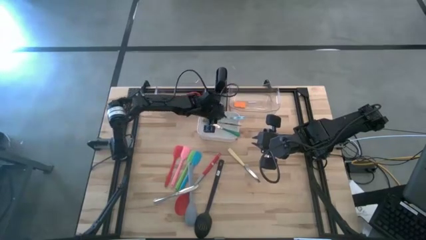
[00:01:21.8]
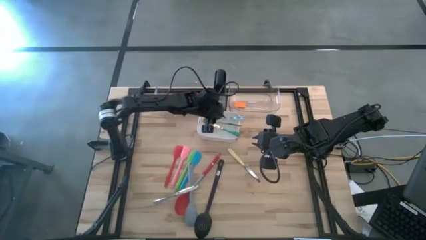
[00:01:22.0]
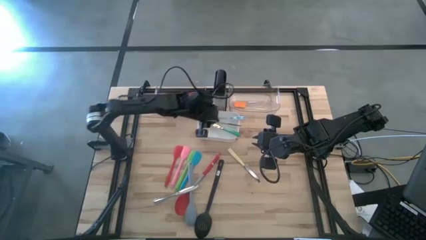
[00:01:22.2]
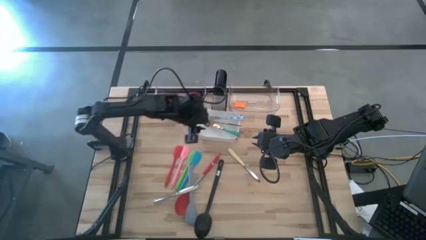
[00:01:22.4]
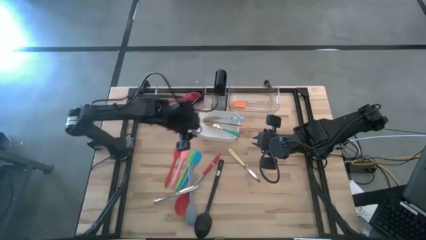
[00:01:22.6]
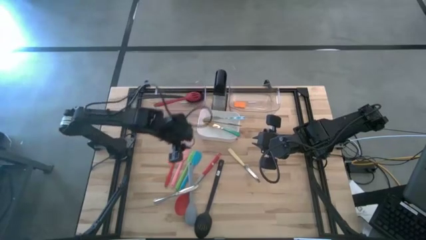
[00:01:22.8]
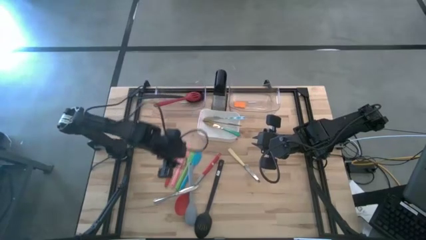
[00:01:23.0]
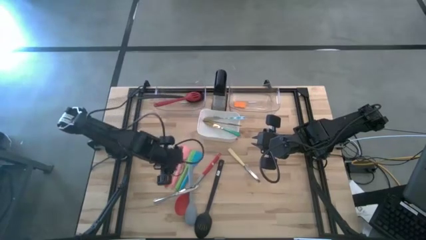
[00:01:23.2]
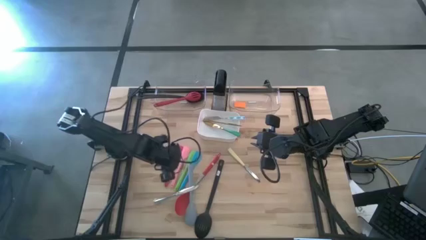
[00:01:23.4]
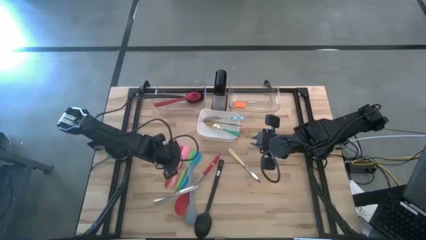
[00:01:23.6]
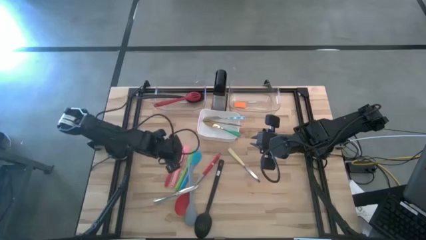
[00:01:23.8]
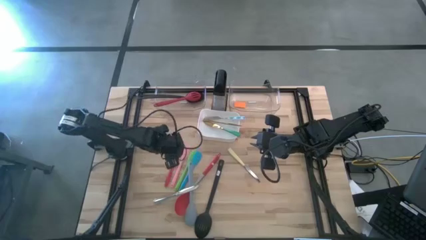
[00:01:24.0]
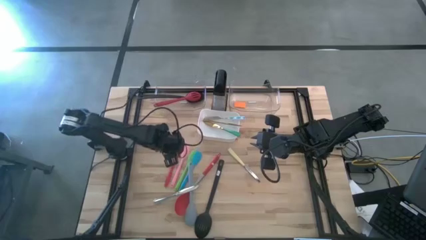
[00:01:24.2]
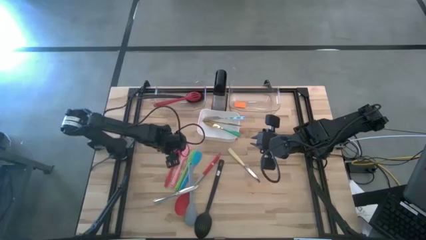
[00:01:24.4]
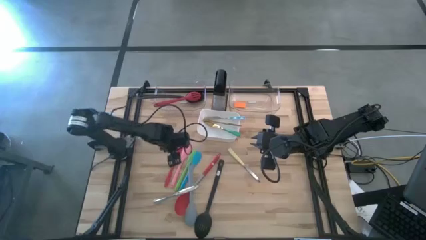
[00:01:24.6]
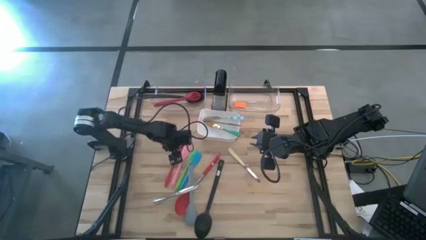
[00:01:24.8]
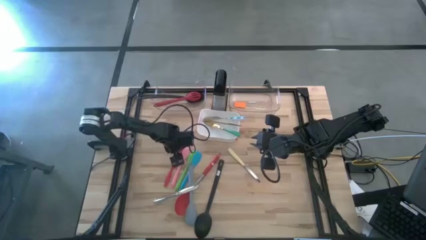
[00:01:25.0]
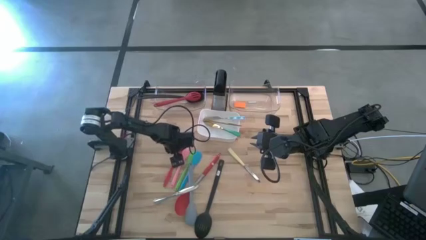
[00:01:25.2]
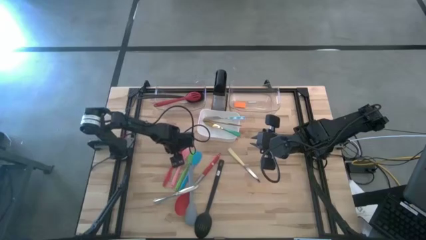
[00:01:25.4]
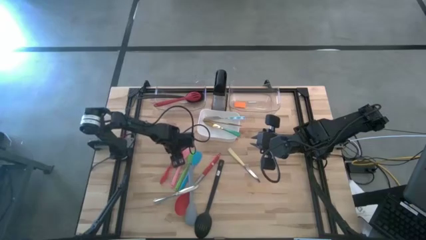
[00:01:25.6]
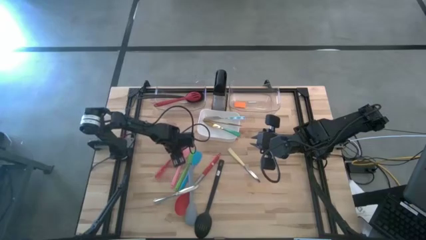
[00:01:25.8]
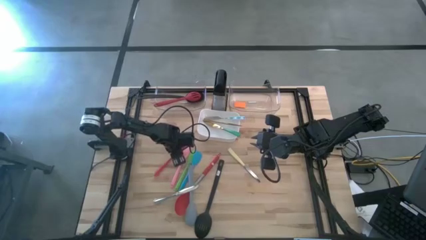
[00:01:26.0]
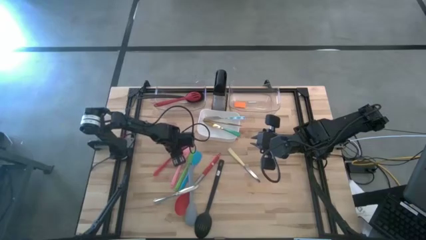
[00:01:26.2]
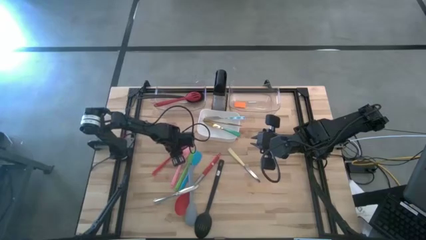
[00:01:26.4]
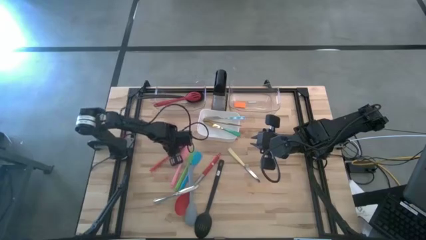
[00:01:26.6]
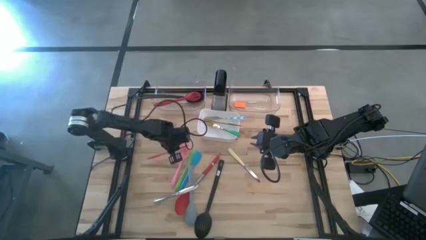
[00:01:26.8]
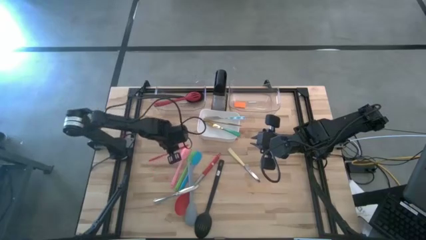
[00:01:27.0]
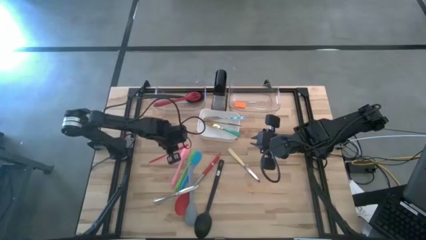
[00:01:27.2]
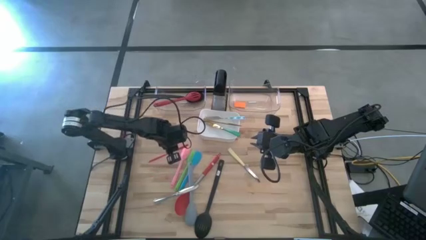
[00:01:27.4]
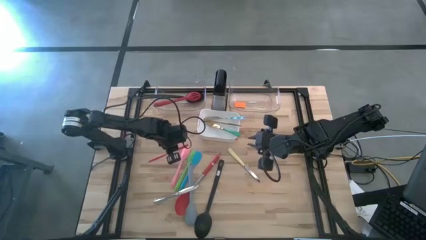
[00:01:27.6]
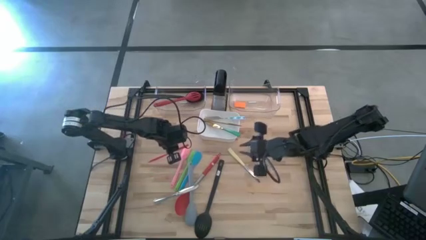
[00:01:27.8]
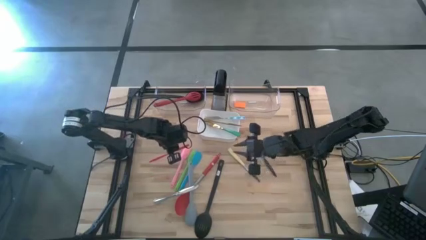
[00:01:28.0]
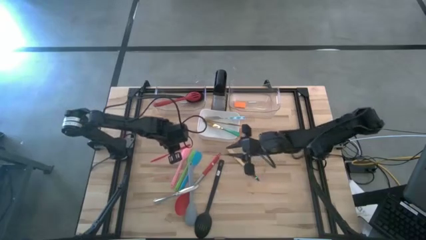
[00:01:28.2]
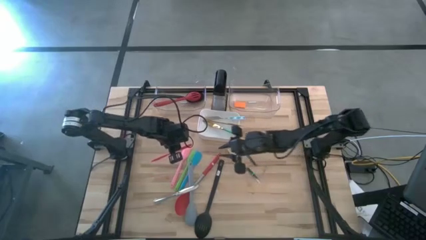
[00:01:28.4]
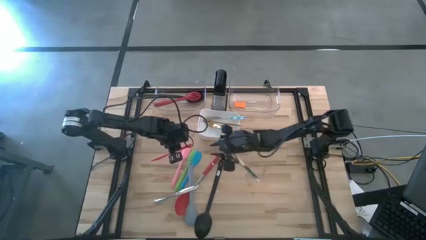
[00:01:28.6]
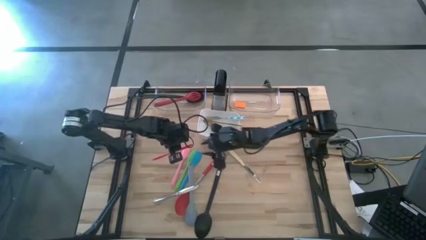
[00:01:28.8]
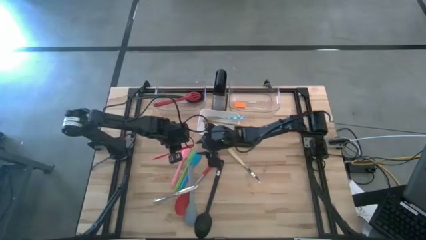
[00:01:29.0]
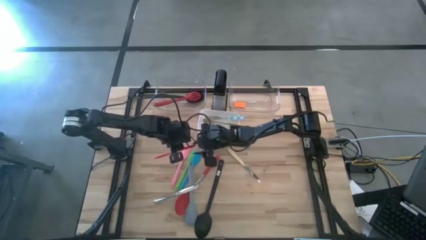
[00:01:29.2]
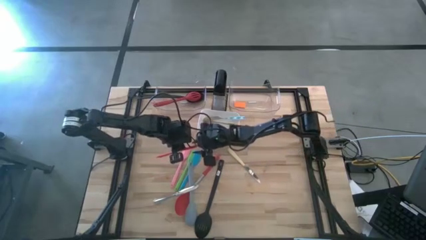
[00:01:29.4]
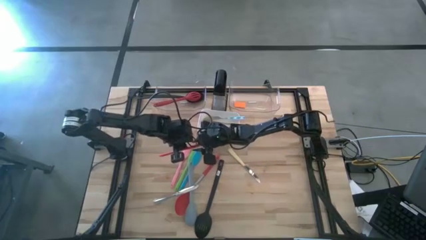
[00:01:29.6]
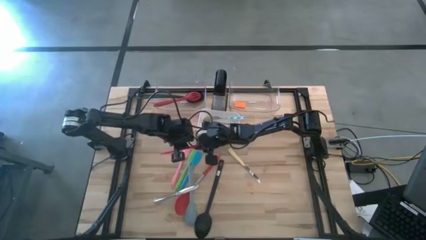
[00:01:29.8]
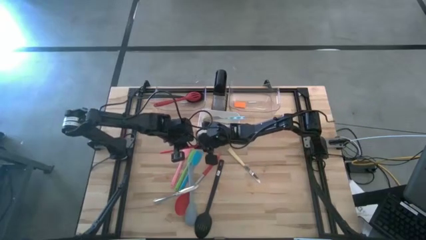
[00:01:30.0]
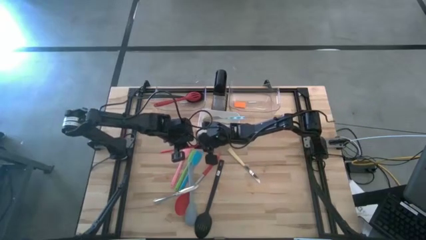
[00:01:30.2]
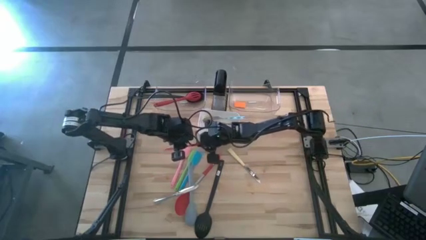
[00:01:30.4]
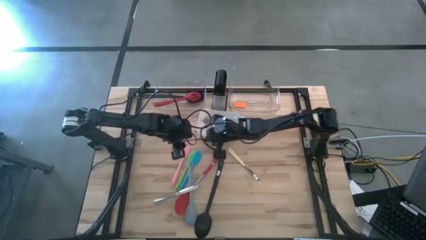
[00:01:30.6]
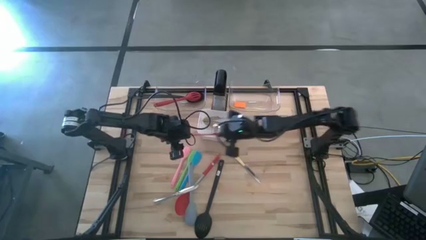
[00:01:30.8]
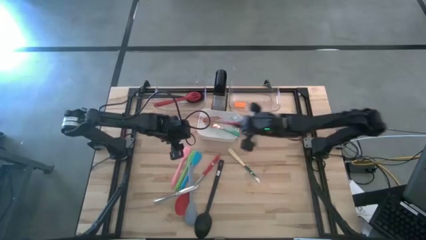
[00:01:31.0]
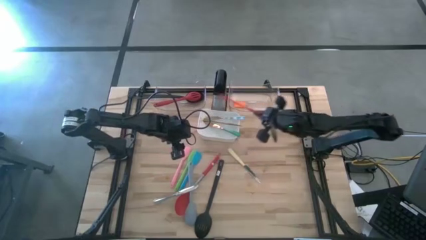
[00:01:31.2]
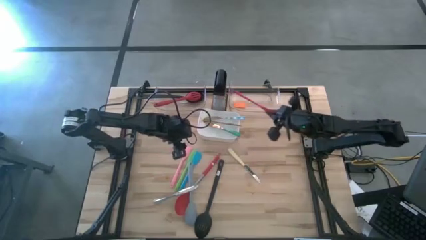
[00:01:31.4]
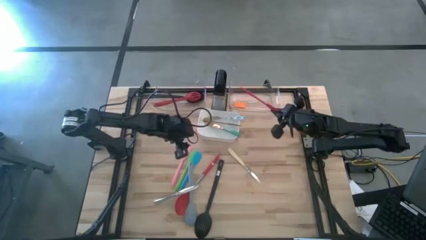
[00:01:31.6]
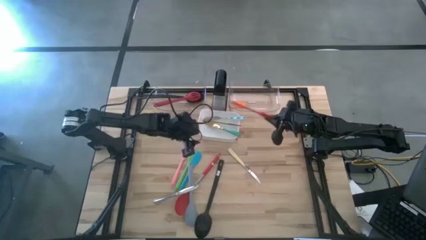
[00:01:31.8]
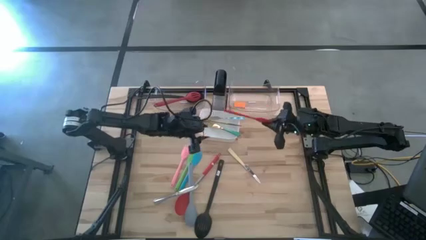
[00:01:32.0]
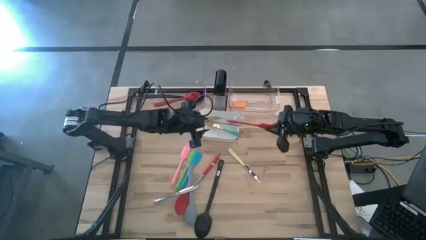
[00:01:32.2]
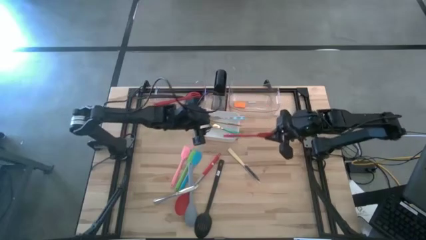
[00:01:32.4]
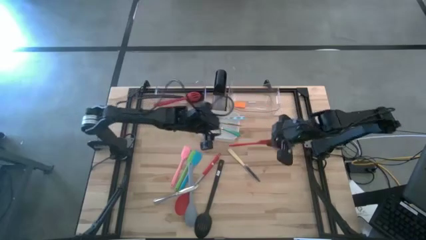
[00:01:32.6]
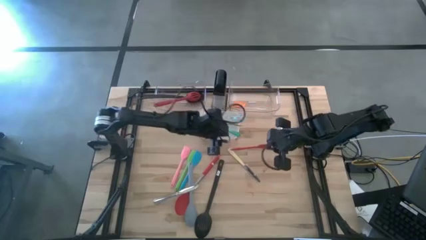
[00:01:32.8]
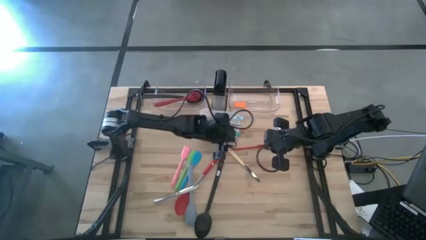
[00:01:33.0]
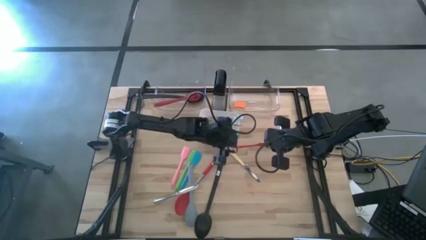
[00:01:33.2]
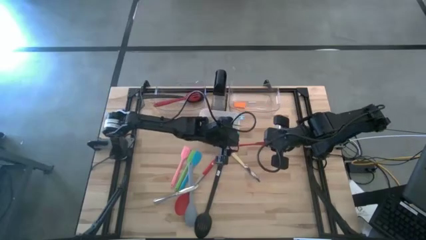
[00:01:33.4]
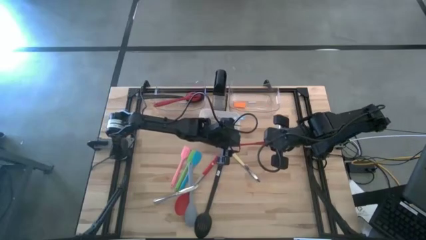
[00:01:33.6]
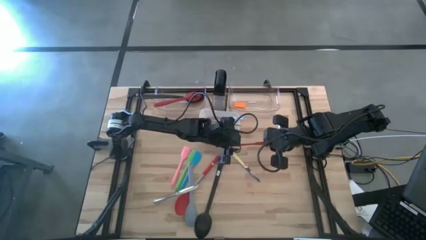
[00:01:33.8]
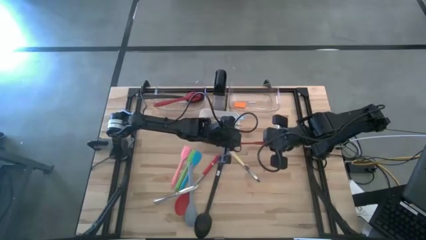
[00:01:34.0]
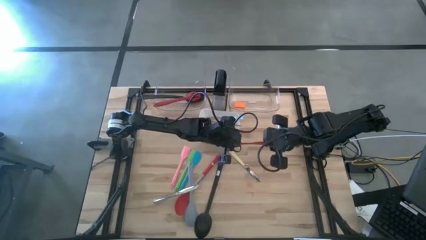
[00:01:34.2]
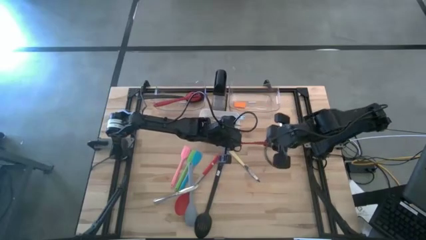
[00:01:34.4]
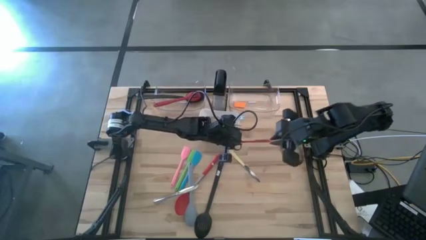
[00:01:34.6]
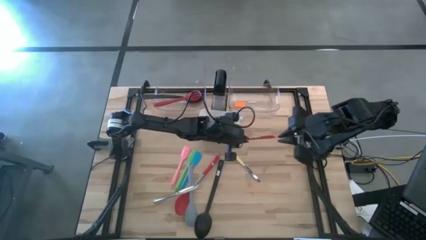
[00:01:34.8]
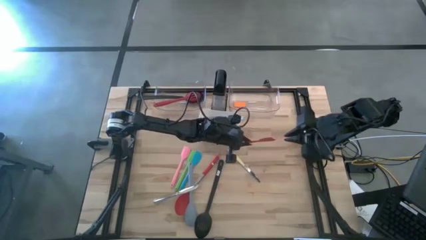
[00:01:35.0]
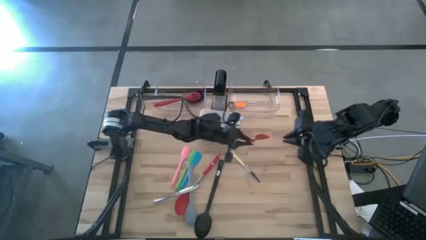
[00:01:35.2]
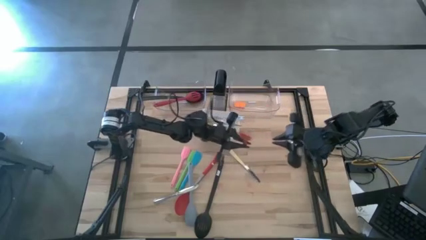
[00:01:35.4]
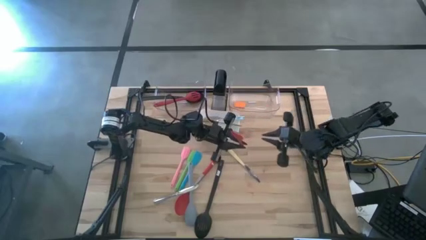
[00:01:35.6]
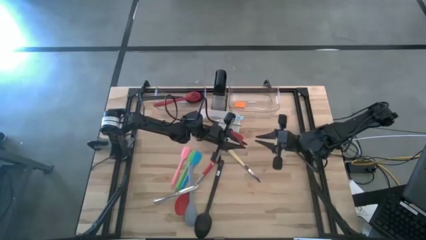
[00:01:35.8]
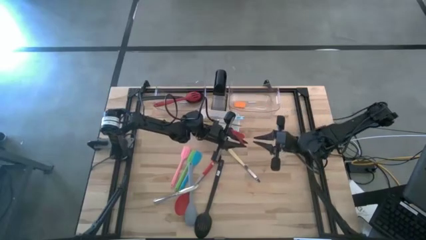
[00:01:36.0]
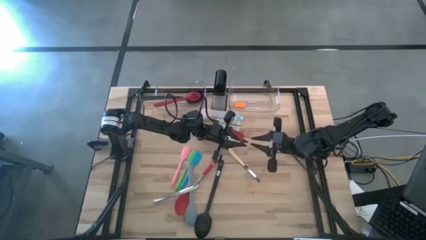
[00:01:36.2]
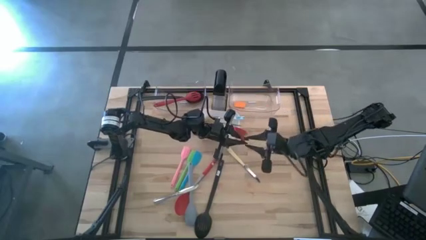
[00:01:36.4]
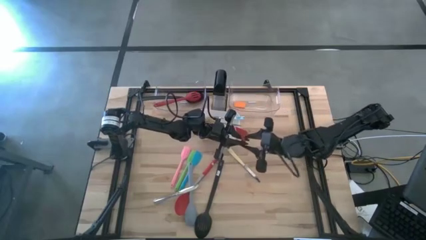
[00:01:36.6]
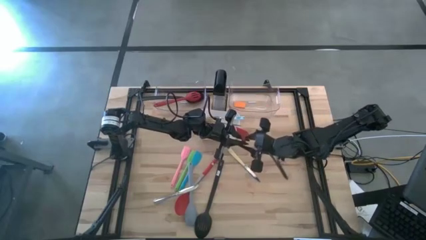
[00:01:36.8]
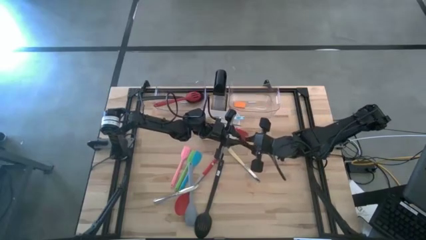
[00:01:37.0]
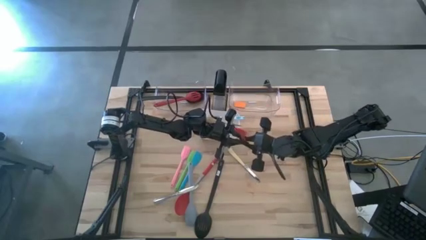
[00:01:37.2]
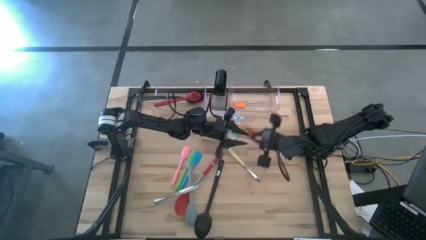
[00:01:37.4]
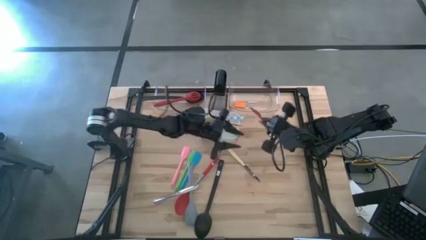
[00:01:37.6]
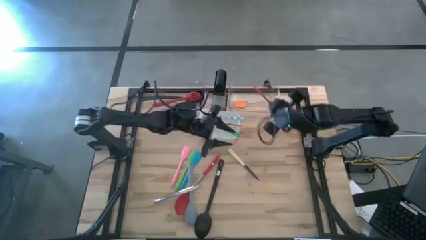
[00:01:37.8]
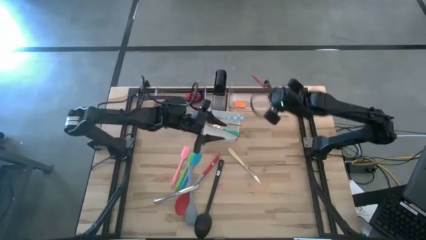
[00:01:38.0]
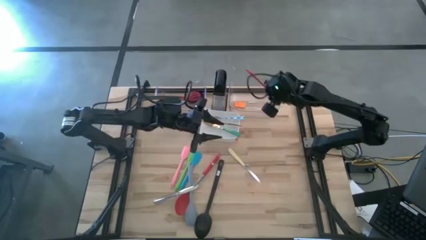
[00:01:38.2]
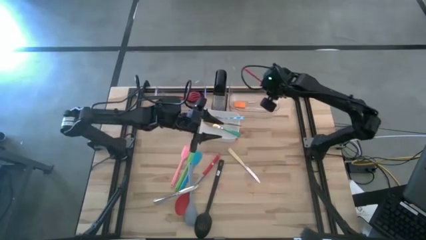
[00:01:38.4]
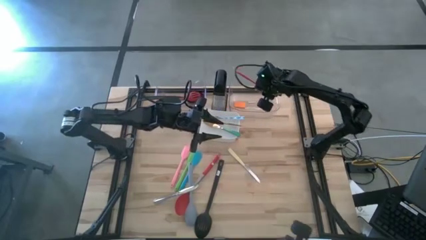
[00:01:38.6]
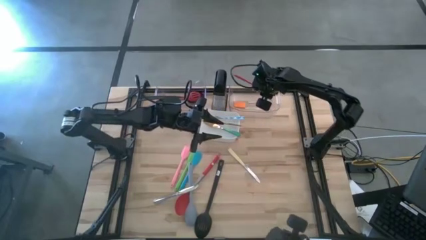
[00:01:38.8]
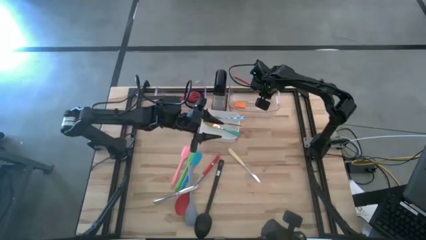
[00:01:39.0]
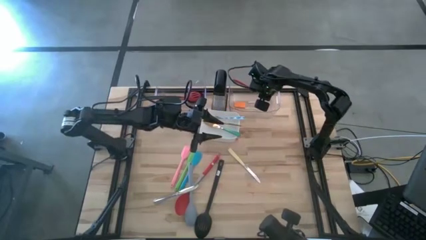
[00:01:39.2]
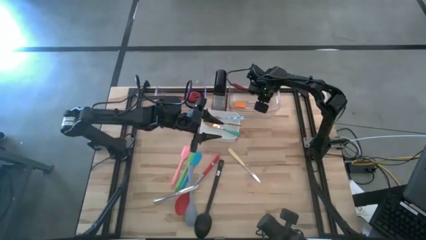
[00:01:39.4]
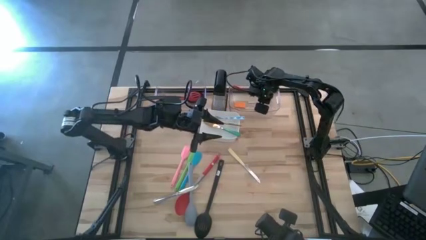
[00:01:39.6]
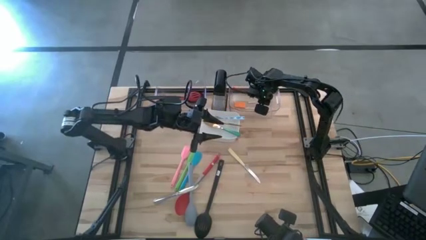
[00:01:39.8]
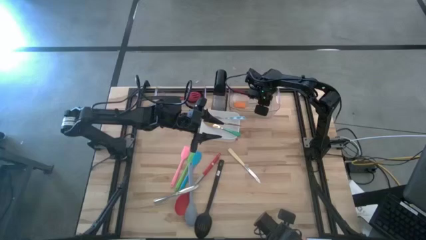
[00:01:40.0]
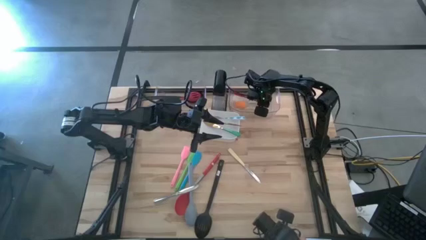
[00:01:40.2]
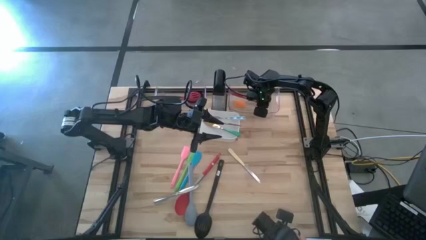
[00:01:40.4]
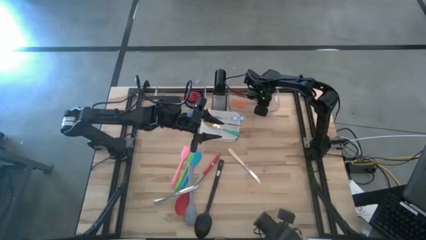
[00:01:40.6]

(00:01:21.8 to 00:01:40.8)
Task: Pick & Place Kitchen Items
Put the red spatula into the right transparent bin
